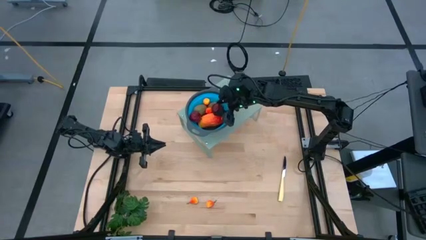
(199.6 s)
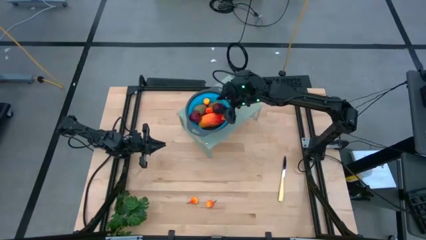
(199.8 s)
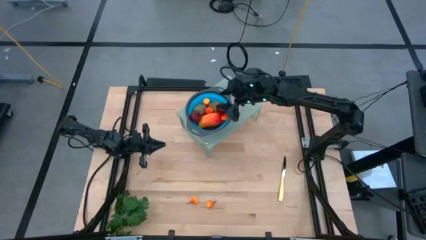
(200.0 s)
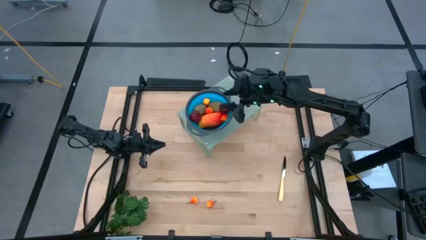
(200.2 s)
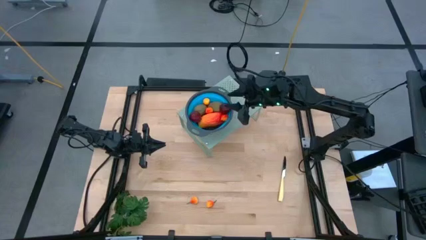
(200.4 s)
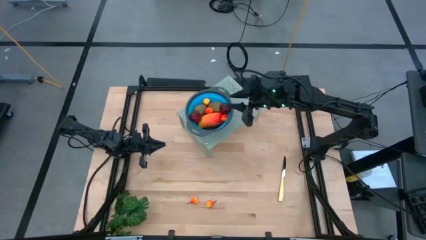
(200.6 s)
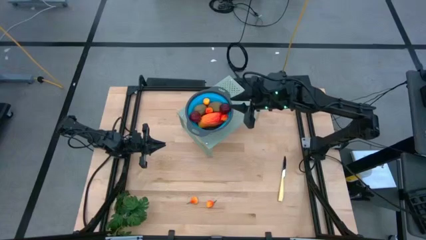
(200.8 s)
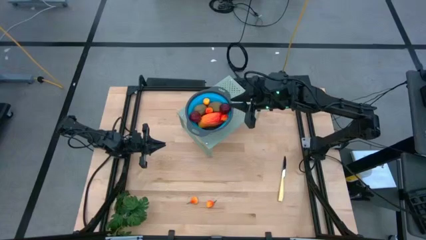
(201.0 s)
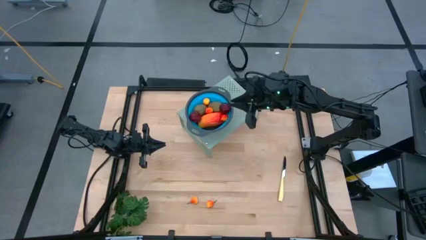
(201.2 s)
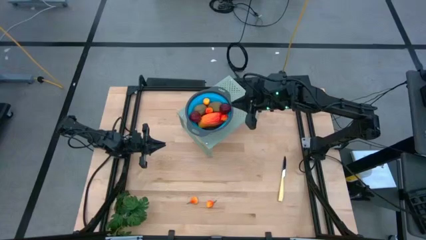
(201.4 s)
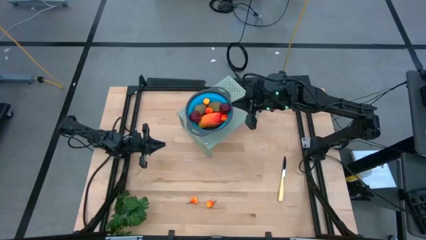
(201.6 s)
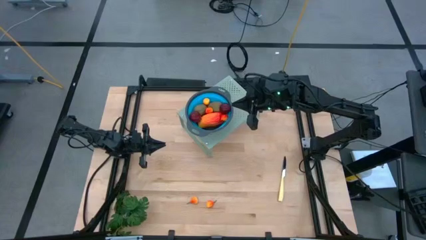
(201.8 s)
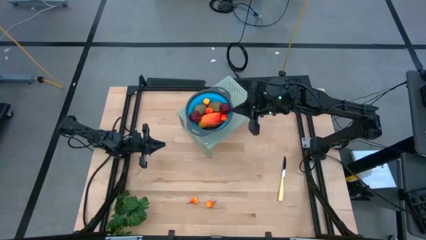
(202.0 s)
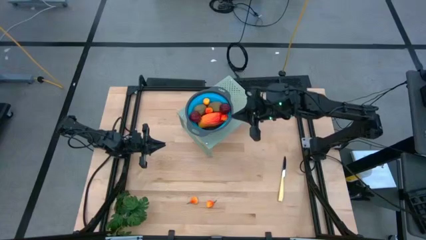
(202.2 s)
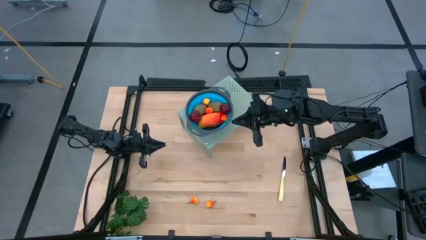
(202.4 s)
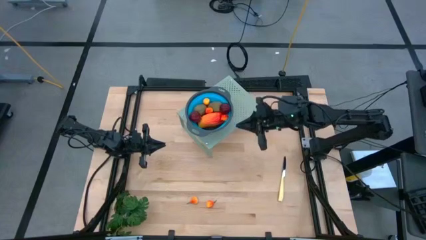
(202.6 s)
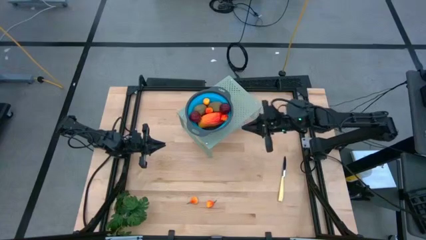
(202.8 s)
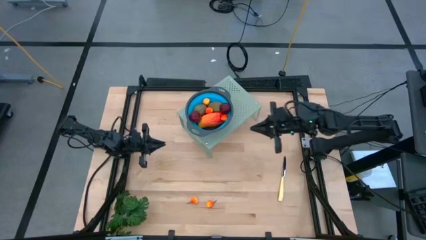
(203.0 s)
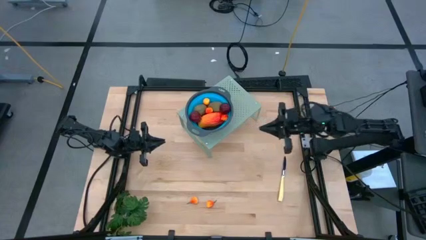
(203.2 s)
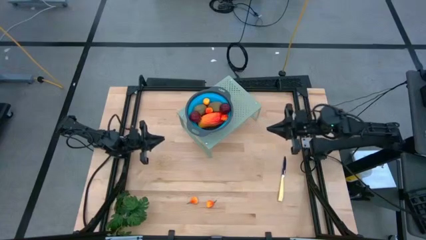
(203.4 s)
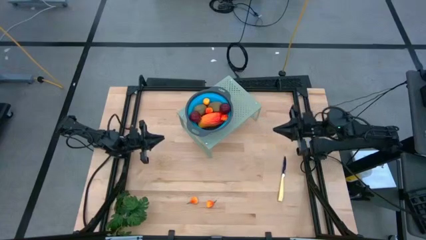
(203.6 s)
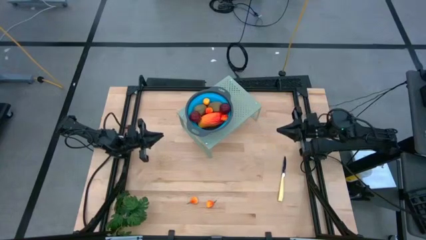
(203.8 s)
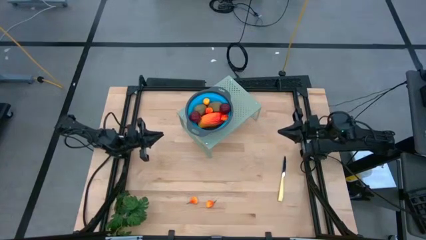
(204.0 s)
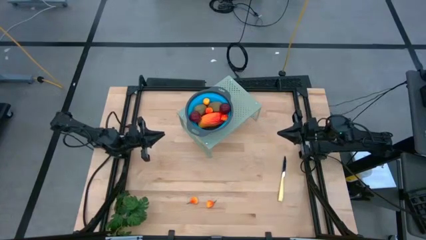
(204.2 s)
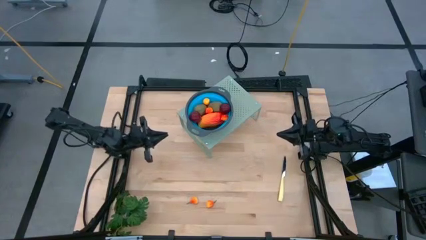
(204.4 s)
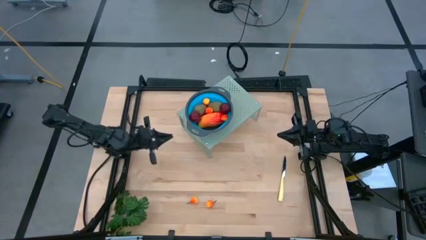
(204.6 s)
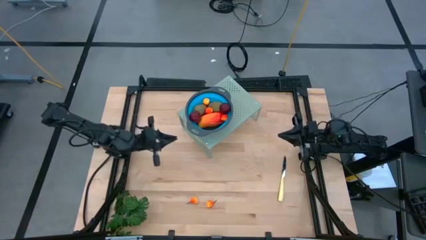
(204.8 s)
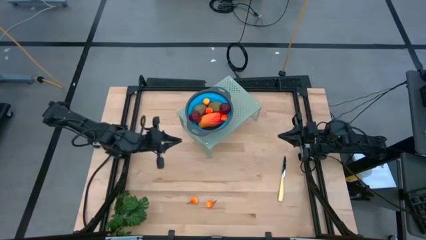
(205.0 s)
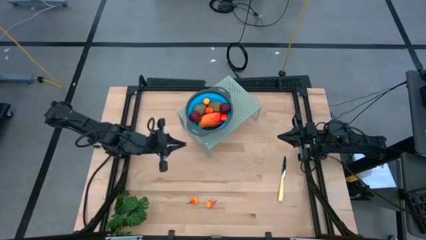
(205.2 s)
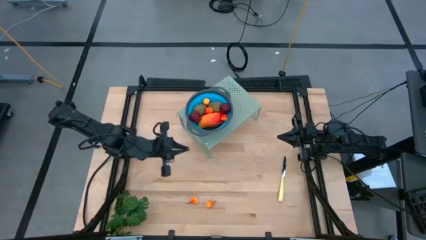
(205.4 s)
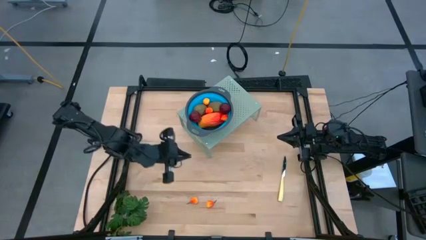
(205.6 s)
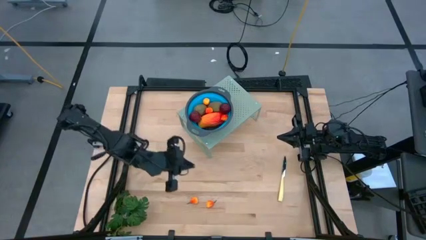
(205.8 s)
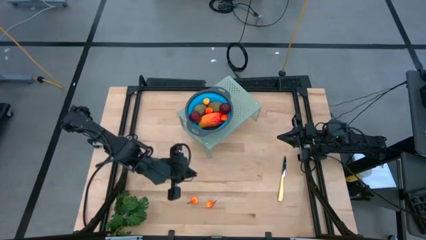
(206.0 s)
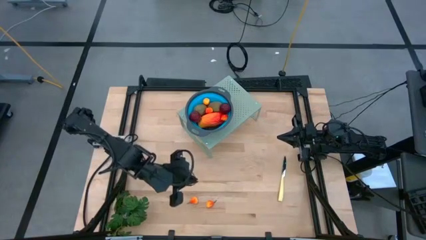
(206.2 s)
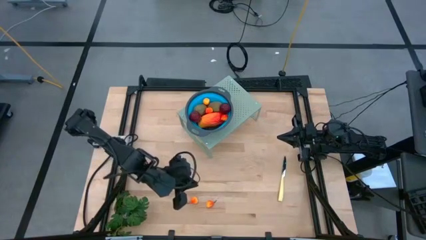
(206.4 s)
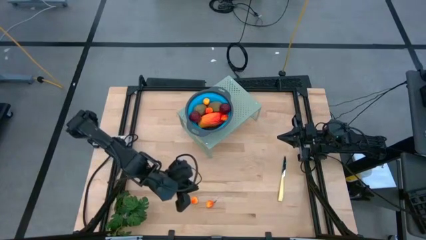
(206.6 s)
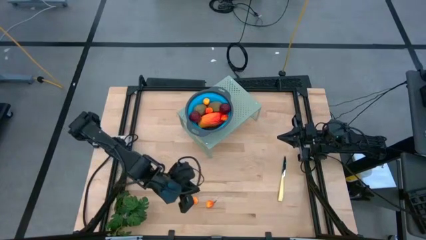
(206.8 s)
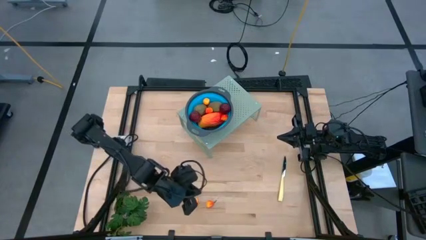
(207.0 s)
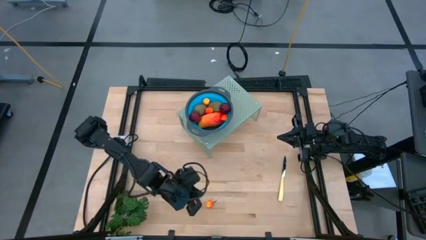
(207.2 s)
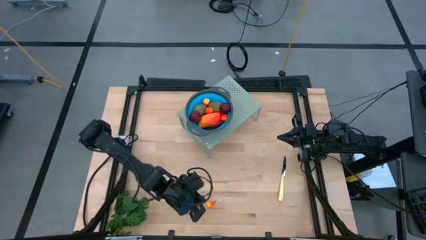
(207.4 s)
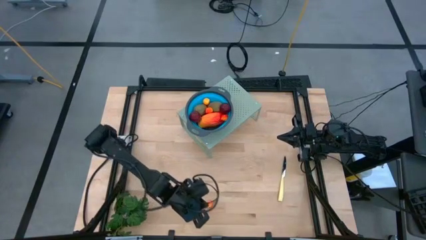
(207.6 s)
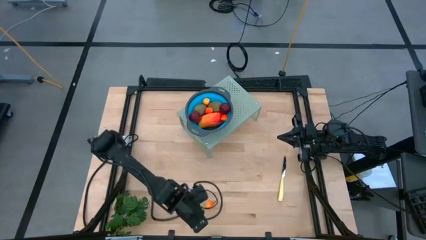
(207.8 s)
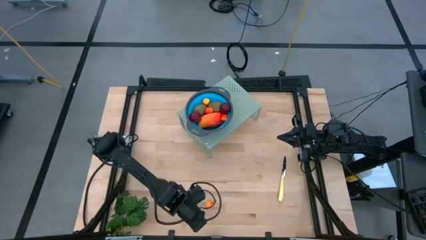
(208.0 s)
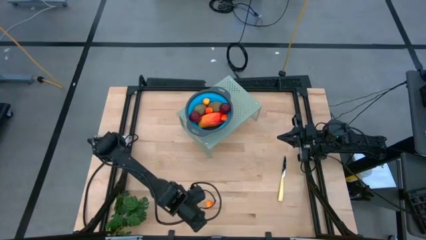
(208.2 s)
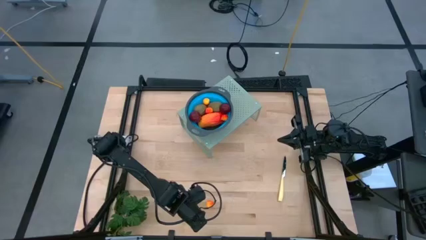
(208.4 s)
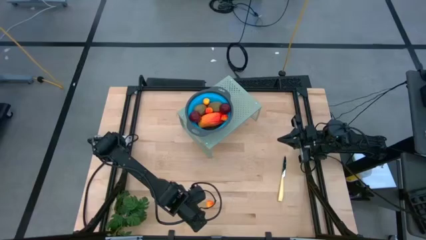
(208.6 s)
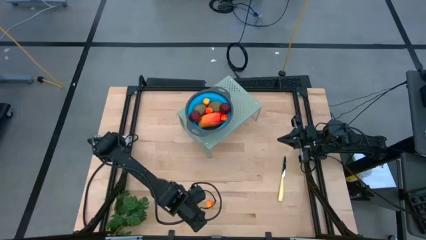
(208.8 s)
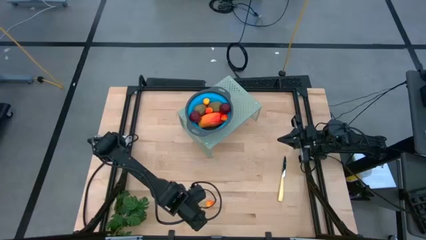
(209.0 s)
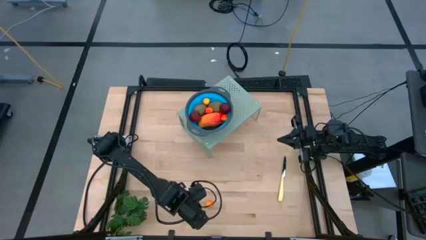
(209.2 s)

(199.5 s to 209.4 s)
Task: Pick & Place Fruit
Put the red yellow peach into the blue strainer bowl on the shelf
